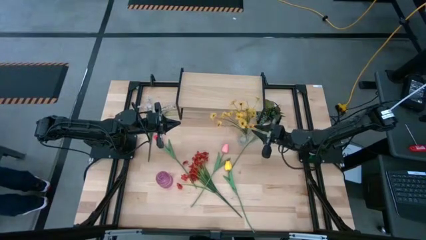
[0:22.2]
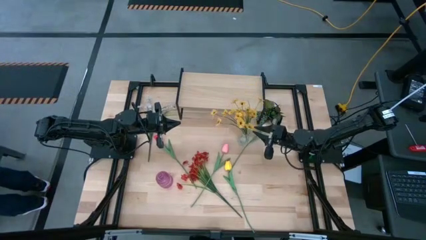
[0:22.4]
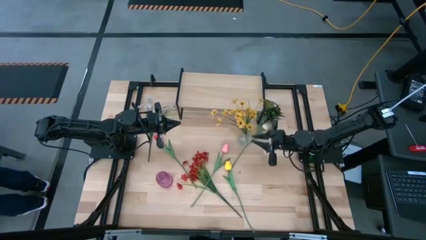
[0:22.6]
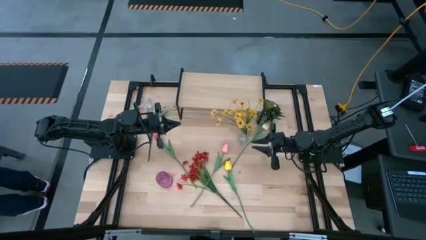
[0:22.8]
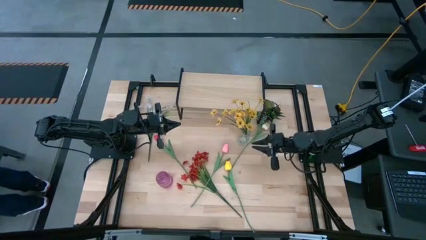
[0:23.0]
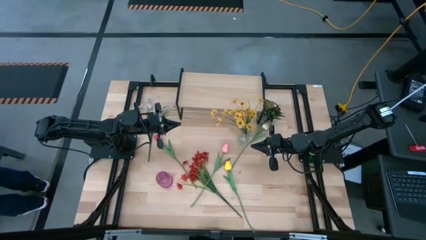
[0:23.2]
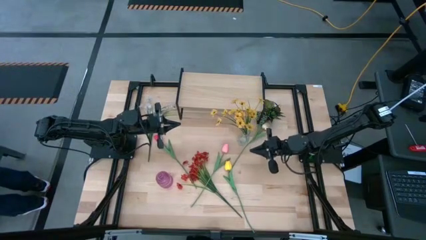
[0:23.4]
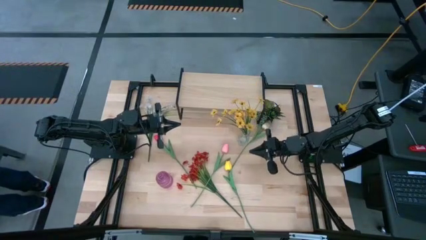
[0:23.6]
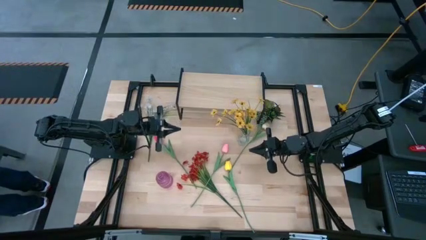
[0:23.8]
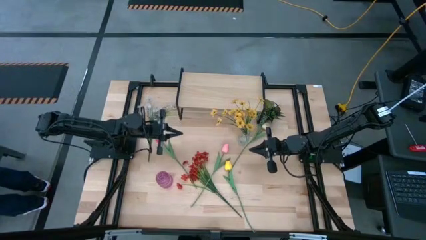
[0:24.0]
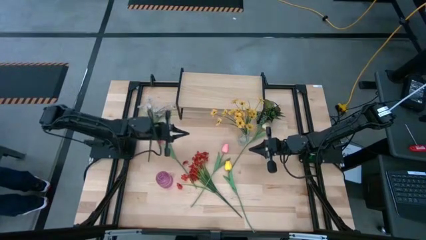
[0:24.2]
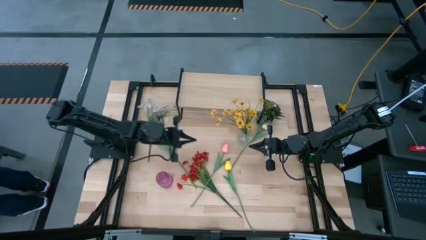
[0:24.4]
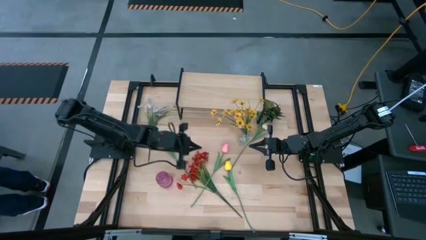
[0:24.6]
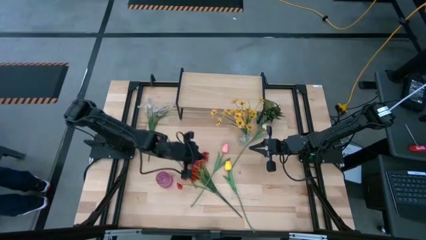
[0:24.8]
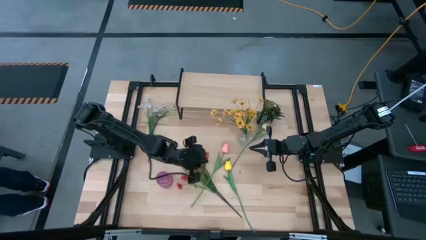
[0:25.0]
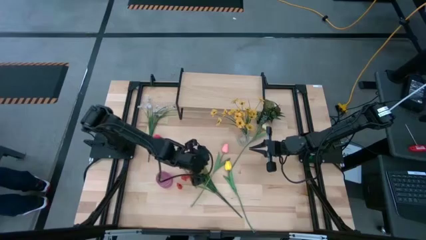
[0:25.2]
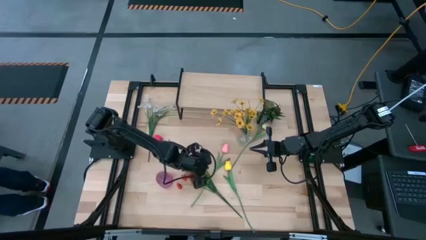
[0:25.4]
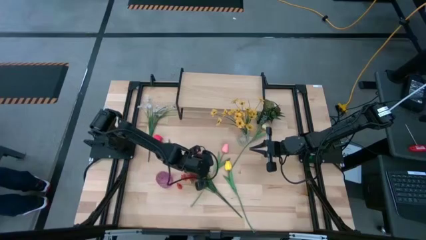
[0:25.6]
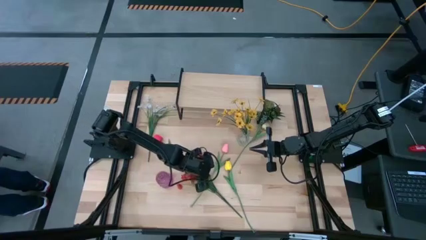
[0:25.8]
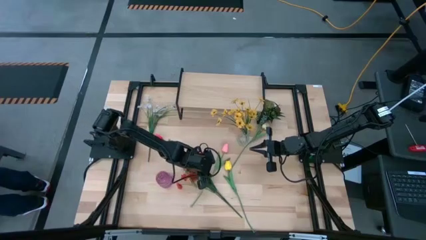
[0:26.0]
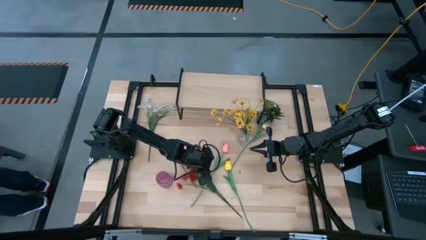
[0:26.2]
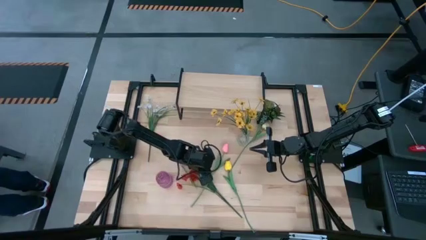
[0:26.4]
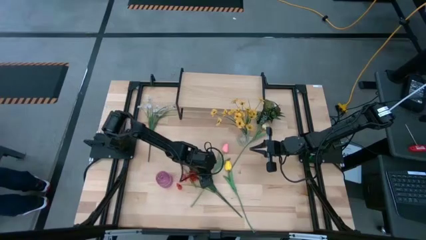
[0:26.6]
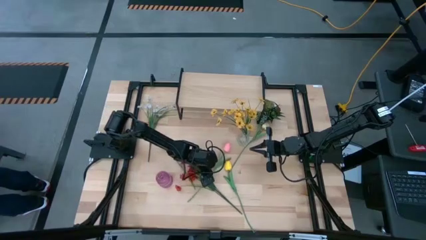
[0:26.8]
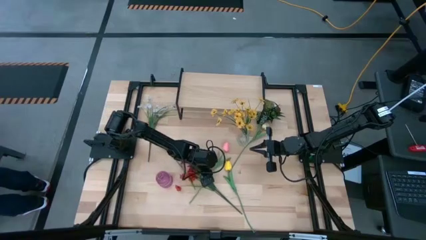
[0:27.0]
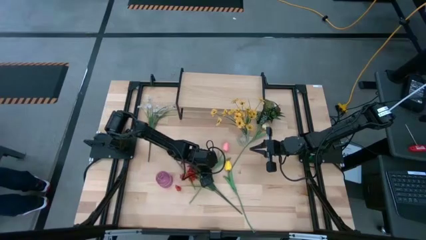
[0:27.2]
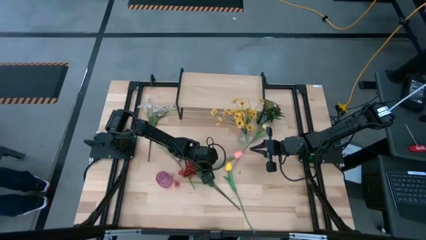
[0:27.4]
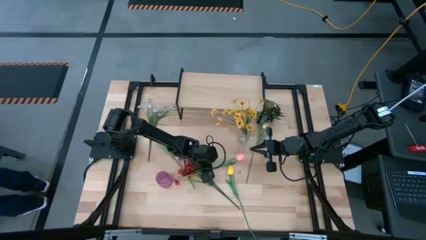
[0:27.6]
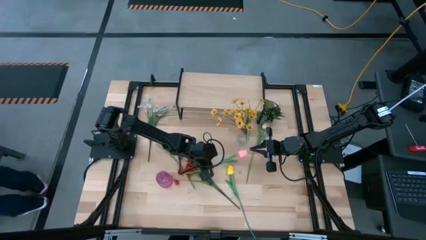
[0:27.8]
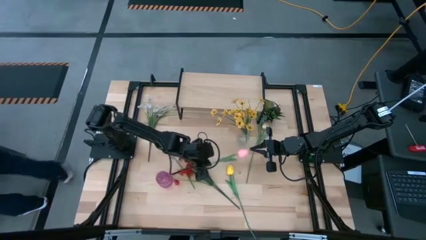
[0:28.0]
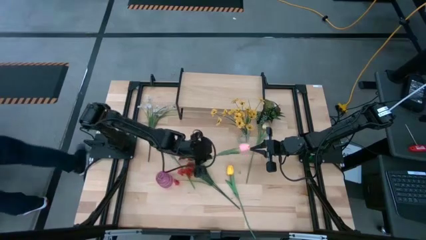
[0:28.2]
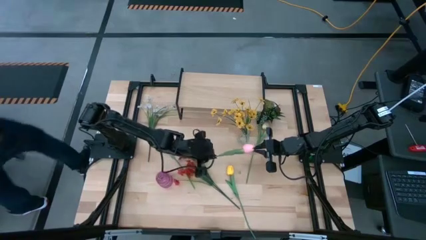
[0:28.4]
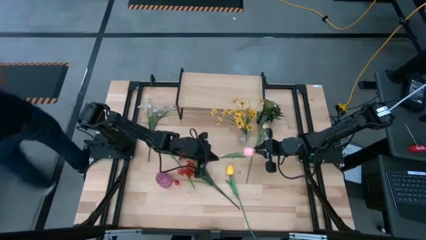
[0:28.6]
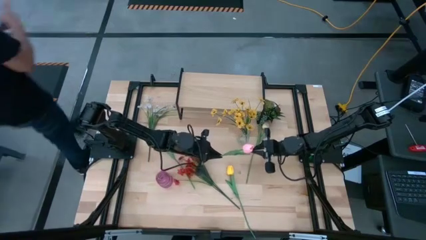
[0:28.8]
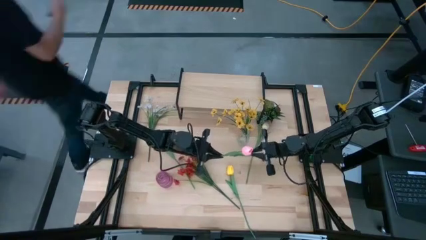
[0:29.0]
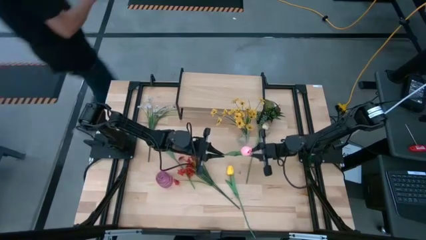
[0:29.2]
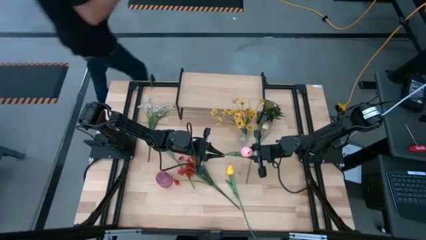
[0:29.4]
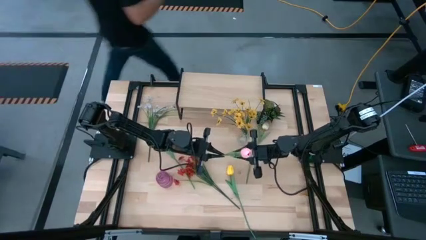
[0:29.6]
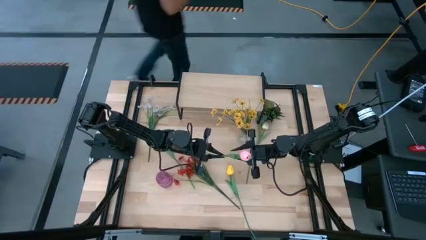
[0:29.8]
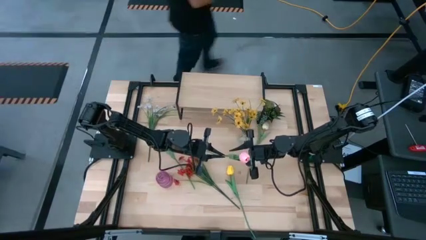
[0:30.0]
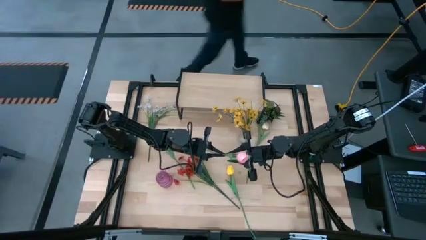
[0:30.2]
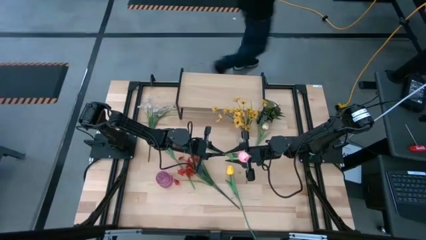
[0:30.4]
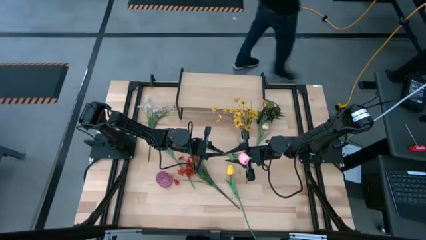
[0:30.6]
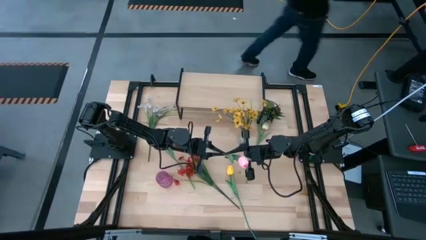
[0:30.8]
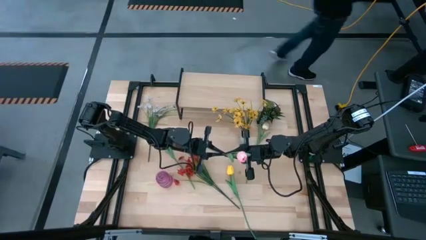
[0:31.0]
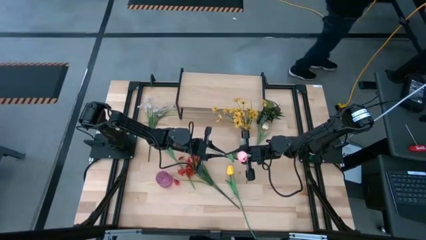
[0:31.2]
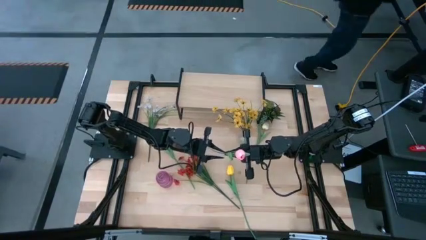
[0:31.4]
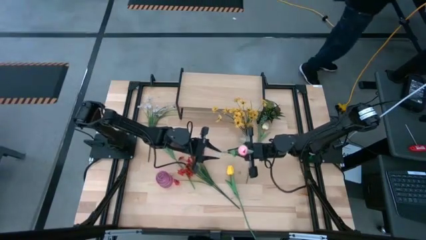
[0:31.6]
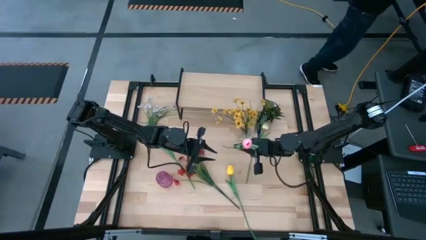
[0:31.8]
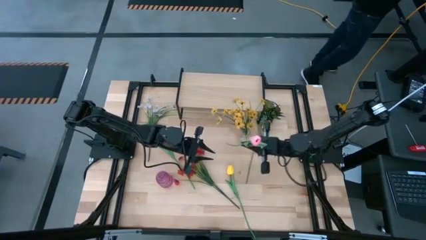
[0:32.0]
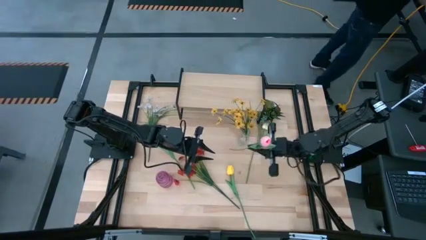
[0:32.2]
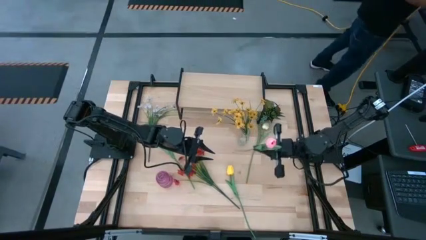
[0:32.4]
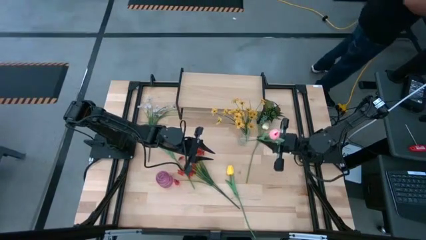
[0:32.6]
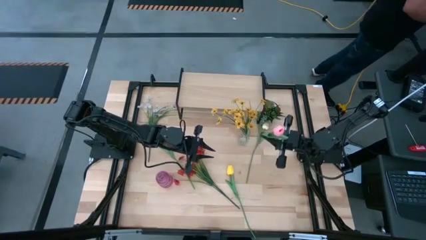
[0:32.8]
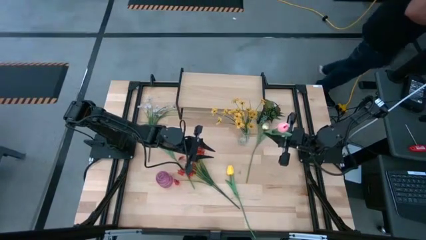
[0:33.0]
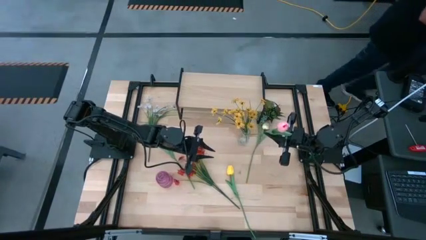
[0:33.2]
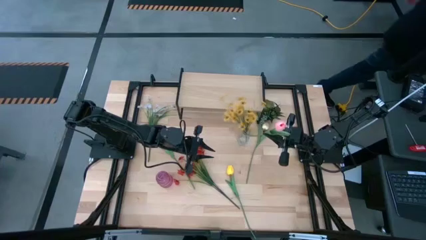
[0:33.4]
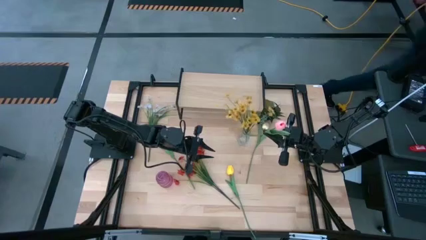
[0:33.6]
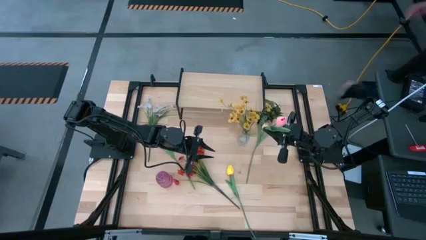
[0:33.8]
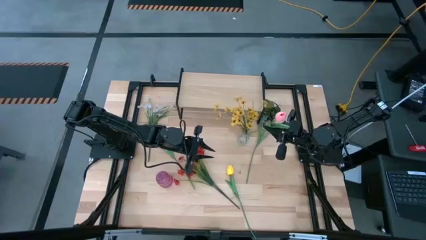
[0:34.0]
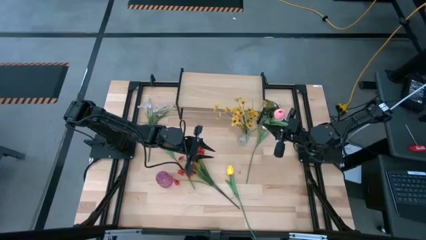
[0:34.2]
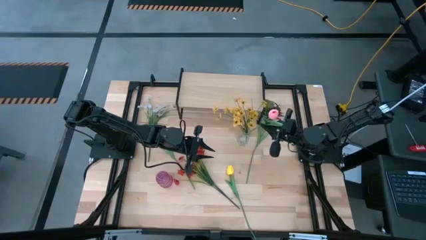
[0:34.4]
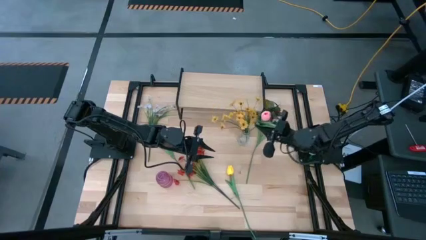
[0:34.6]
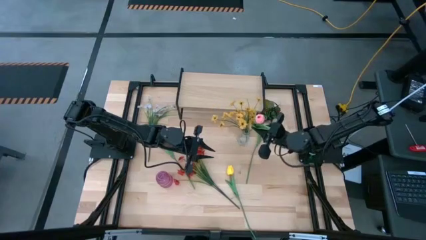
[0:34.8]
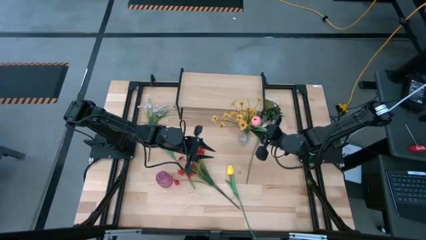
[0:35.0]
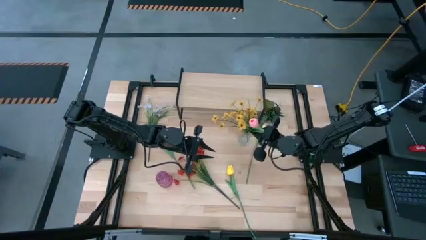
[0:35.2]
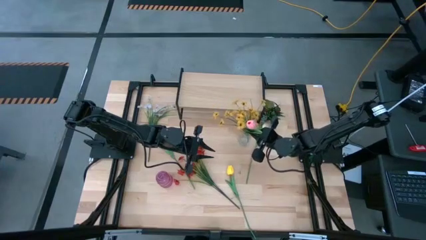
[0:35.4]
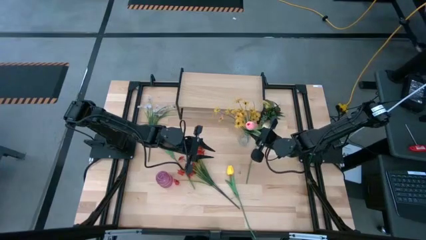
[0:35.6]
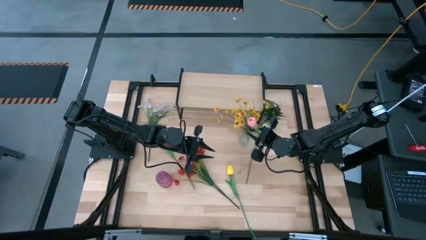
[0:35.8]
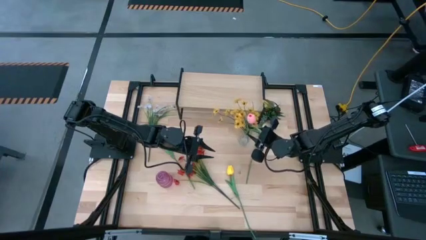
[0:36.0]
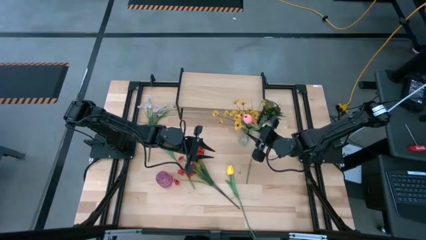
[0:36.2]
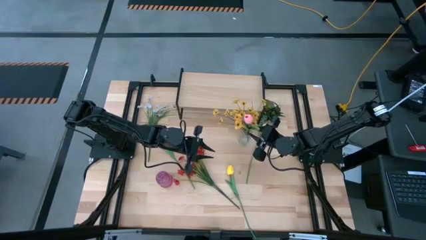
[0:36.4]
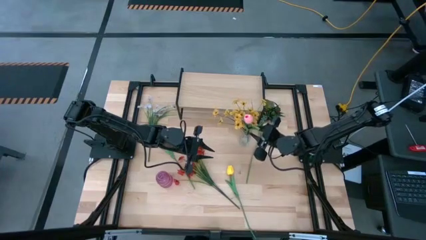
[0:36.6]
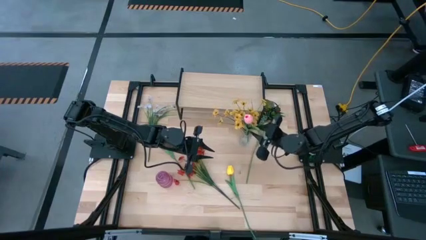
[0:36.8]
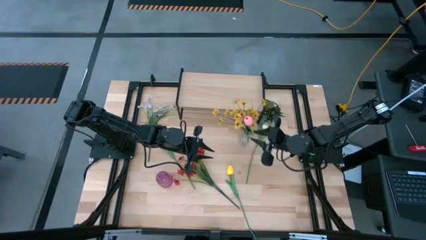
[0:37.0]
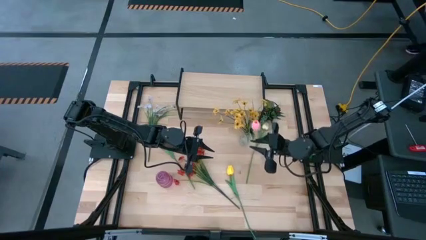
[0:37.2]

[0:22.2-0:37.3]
Task: Pick and place flowers into a vace then onto a shelf
Put the pink flower into the transparent vase
